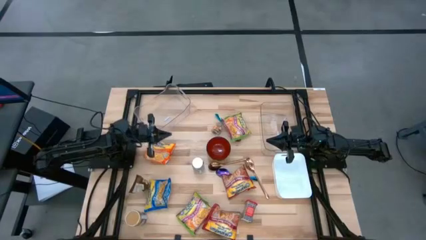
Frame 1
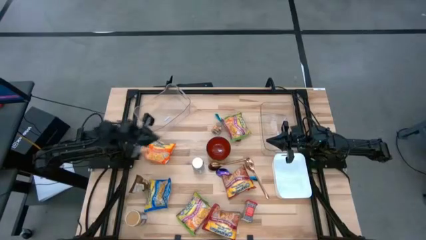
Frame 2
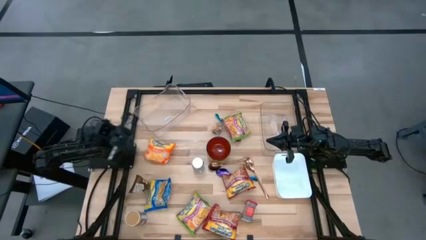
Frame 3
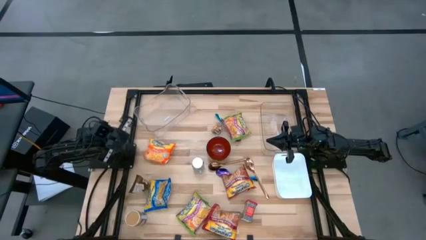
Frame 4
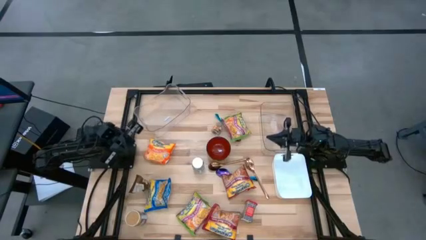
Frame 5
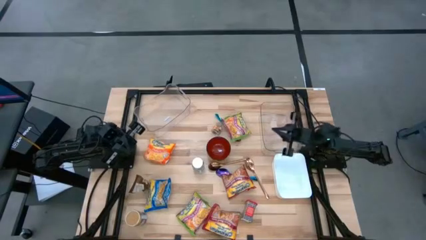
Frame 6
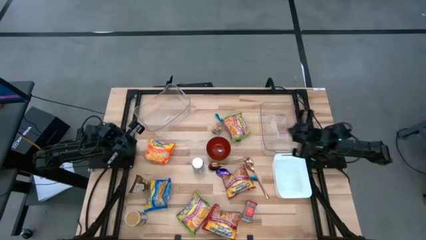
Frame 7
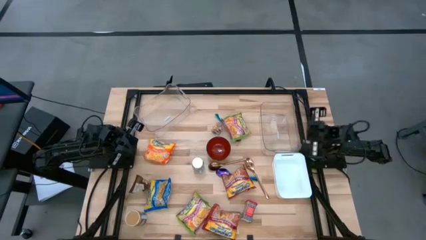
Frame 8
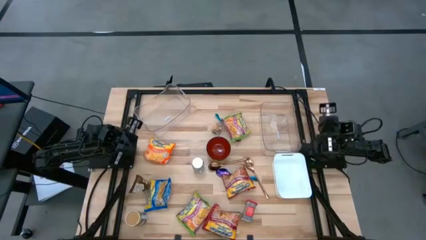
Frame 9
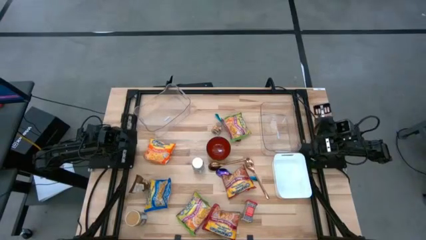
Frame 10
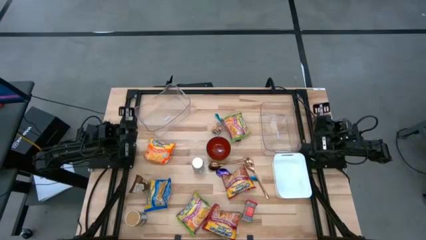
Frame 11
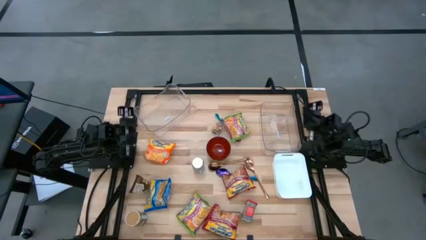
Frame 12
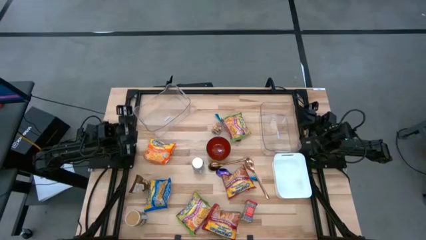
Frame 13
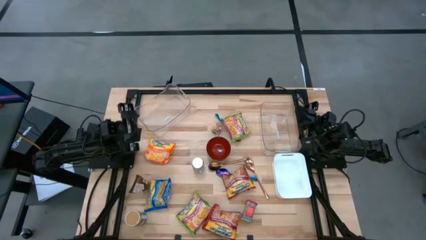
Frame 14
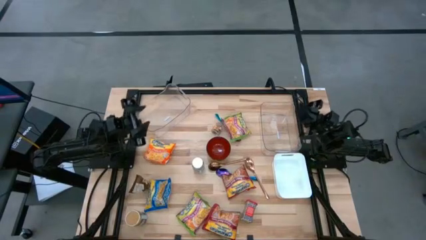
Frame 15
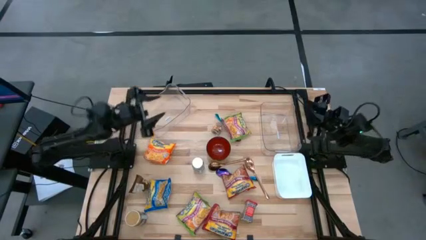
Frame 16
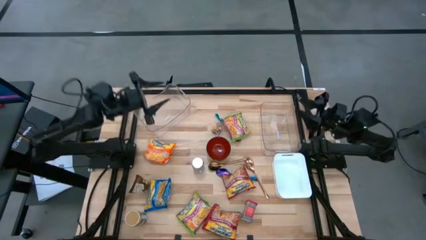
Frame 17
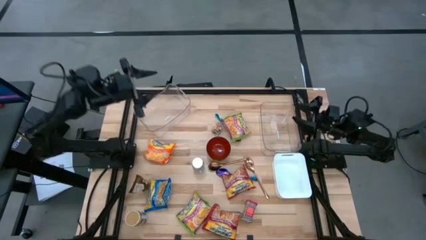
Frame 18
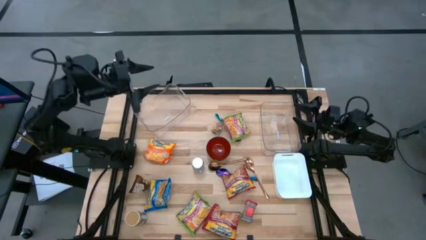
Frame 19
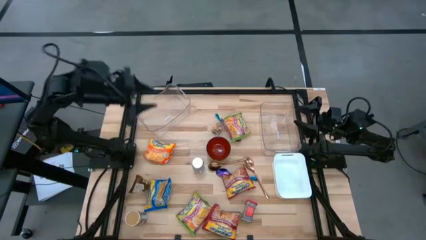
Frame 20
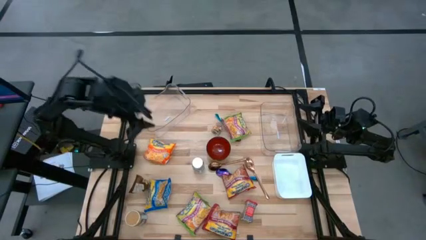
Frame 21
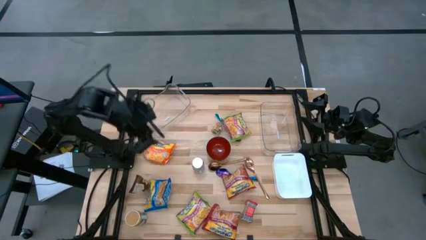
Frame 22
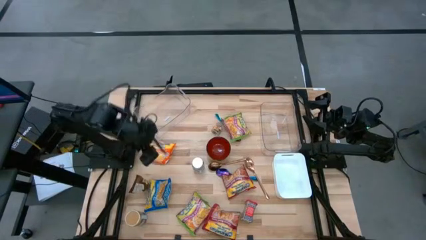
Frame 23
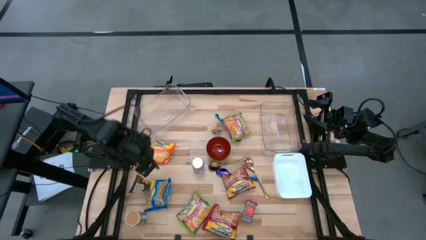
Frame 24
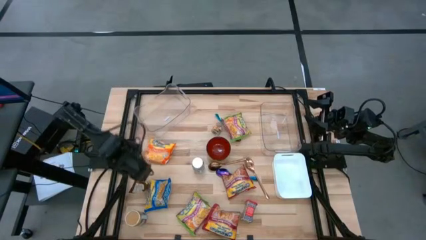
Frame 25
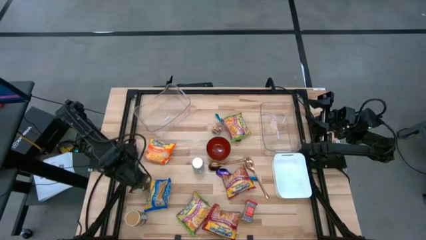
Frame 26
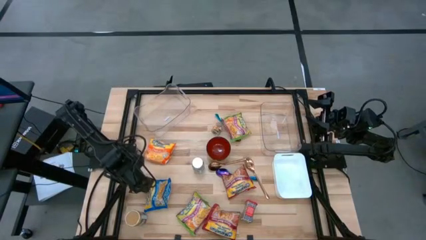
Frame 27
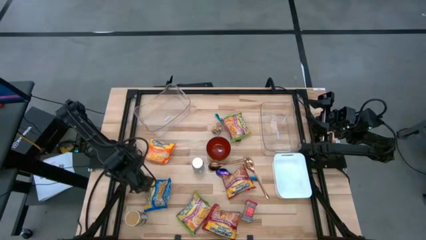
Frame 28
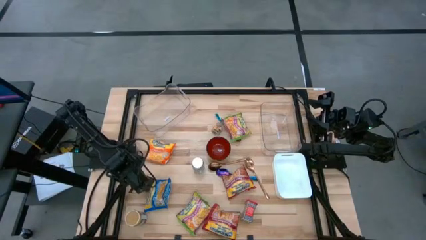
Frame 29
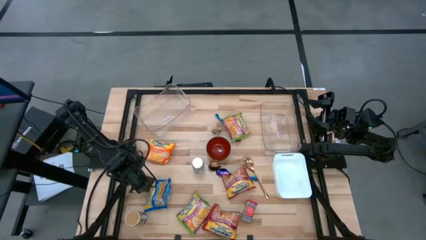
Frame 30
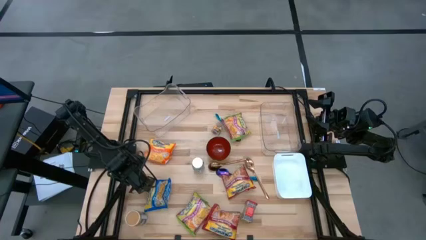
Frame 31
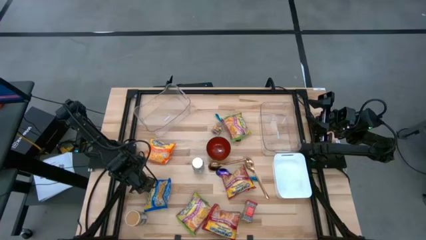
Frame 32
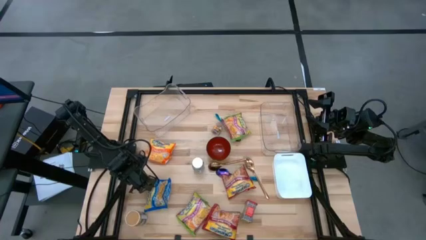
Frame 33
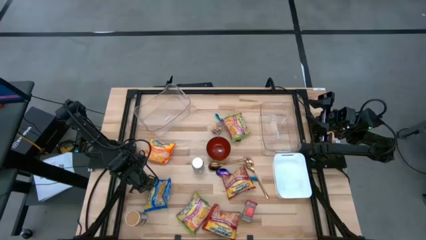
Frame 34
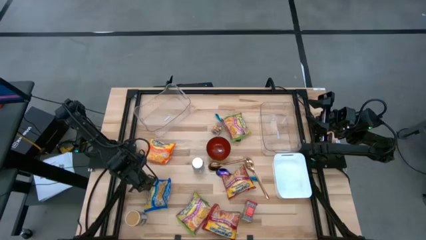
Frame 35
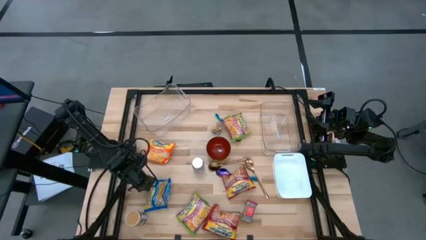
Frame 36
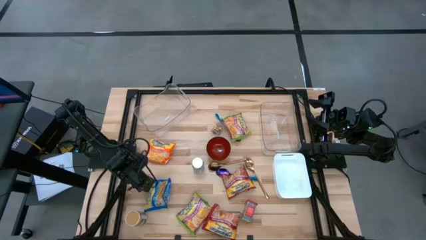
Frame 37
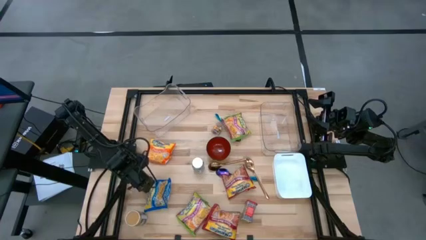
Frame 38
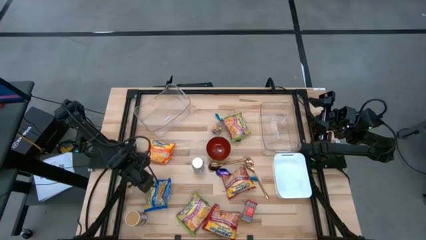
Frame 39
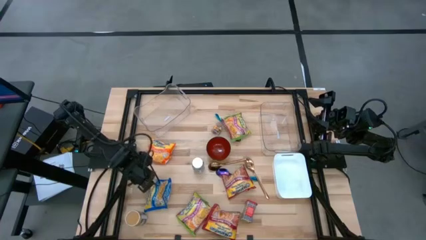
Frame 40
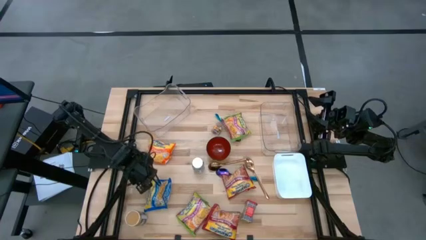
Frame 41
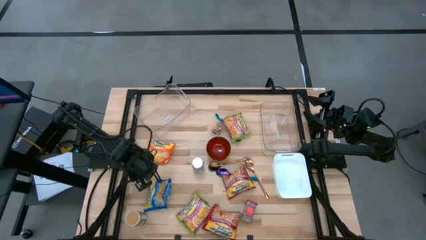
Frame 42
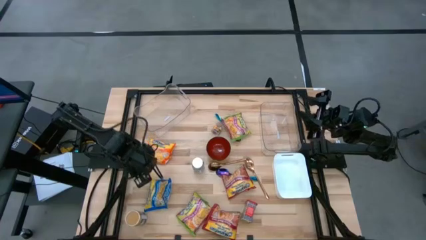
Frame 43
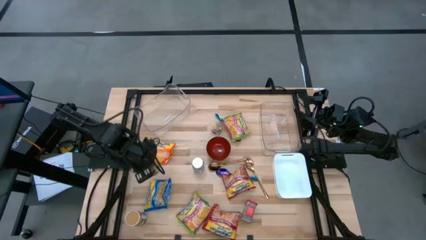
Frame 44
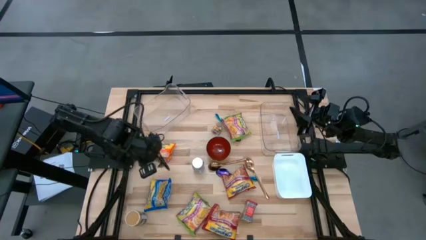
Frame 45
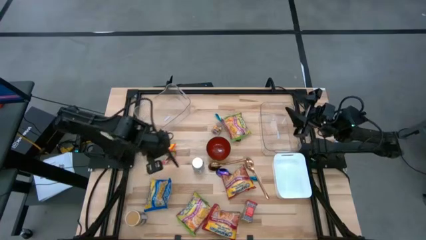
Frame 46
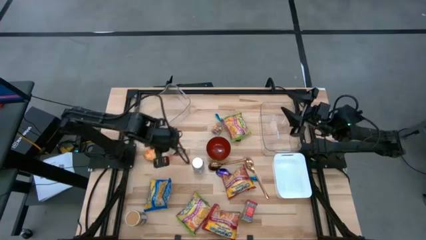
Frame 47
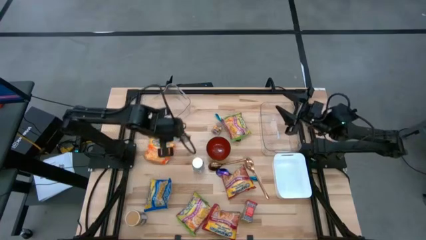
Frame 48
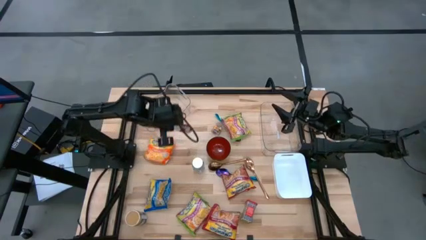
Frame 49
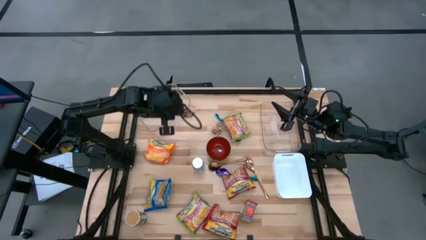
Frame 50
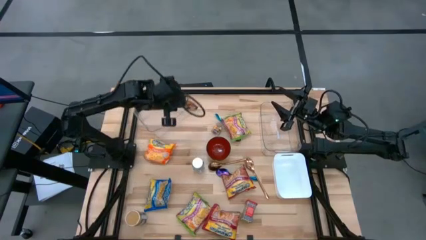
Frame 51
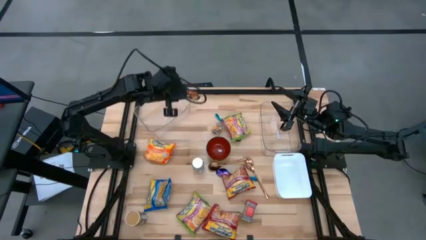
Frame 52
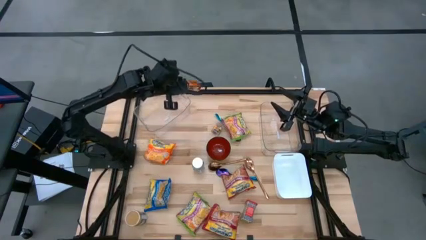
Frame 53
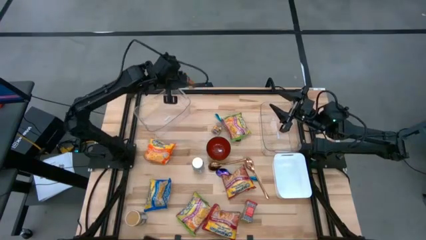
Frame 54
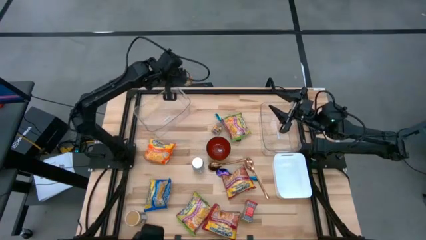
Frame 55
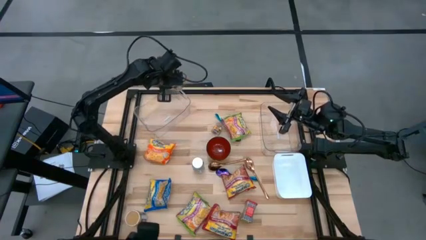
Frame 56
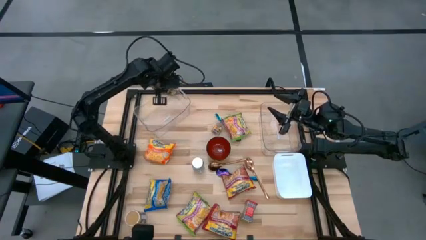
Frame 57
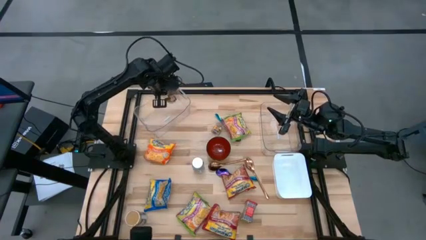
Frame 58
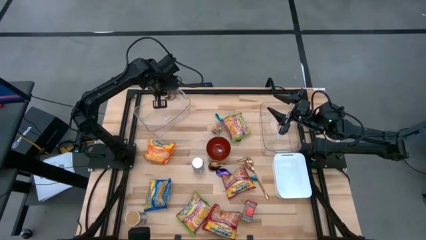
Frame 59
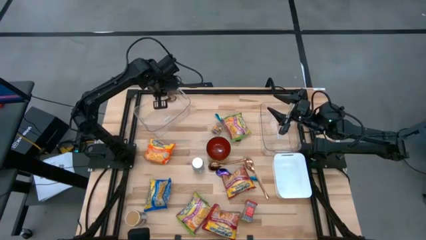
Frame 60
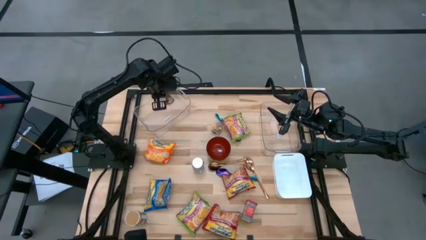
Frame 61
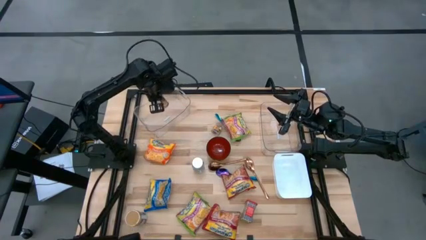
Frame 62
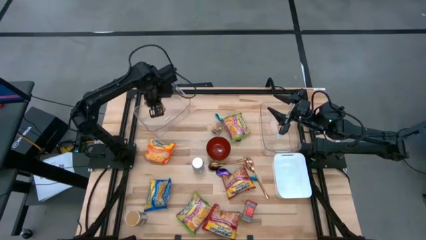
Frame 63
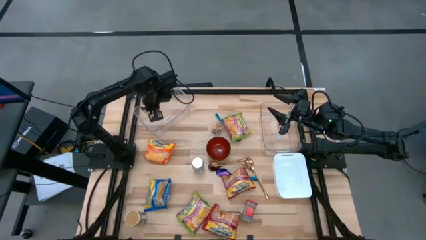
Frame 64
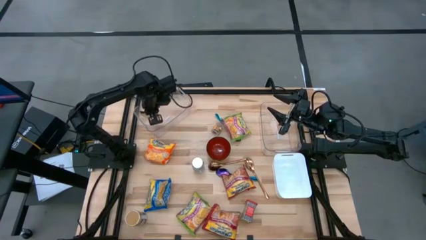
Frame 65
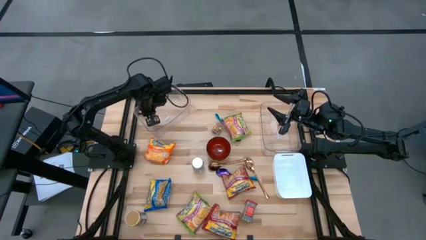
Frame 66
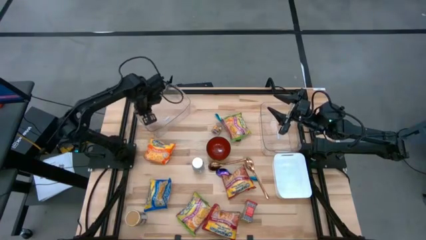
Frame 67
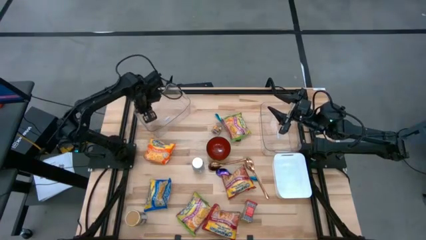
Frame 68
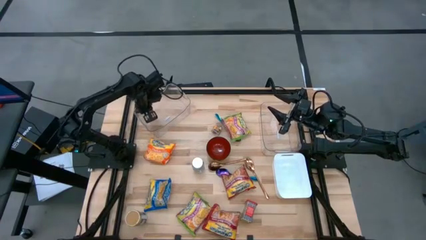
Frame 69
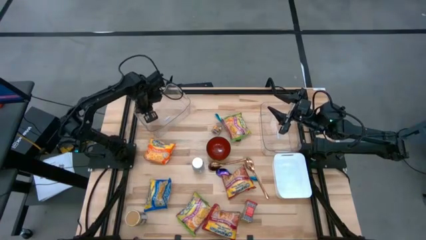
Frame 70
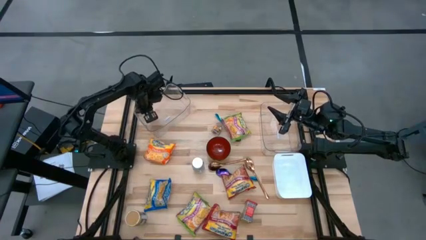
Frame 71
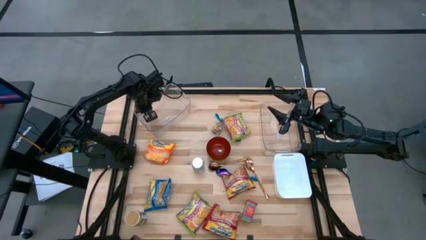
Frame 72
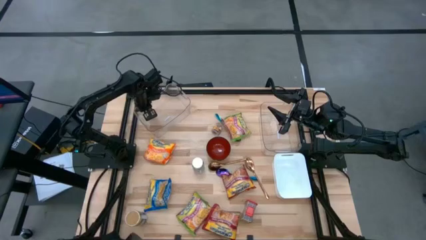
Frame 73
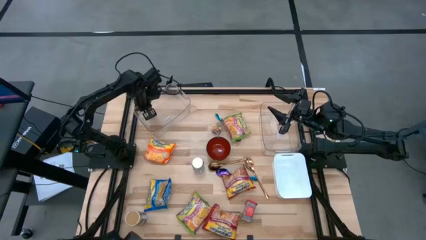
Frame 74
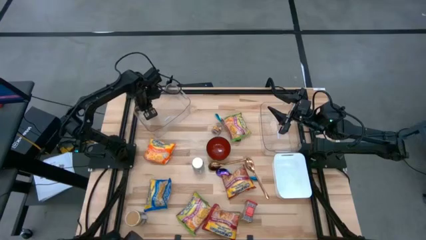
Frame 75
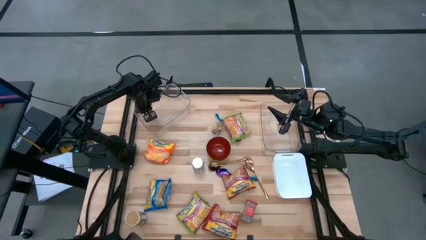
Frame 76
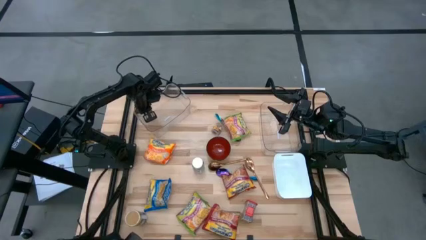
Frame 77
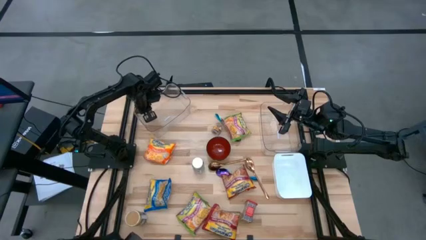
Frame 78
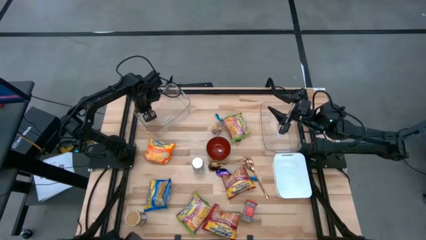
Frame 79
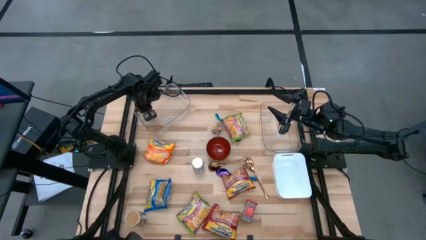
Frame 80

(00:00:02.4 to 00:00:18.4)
Task: Pick & Place Food Item
Put the orange seasoning pack into the left transparent bin
